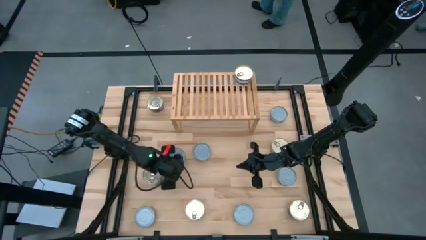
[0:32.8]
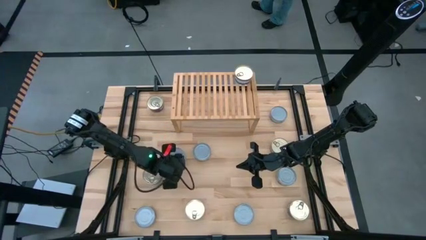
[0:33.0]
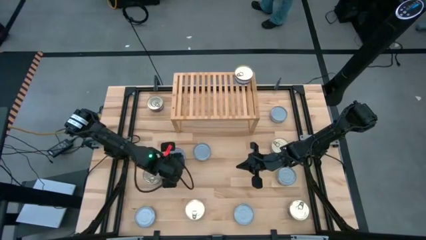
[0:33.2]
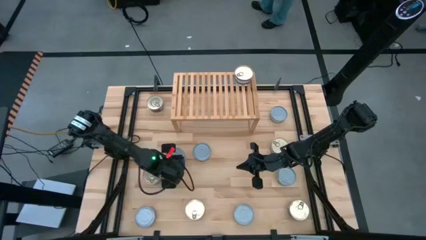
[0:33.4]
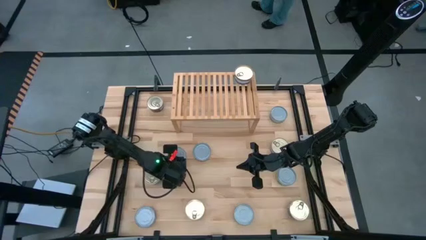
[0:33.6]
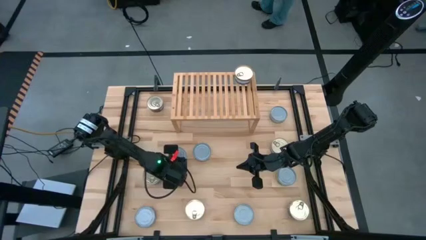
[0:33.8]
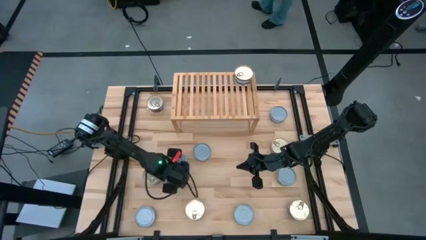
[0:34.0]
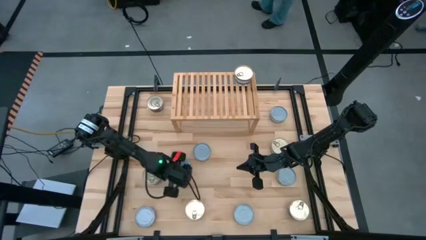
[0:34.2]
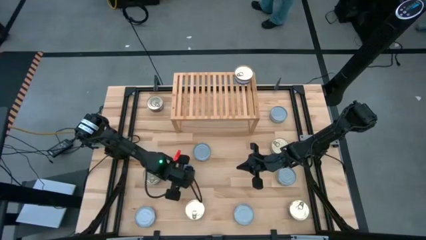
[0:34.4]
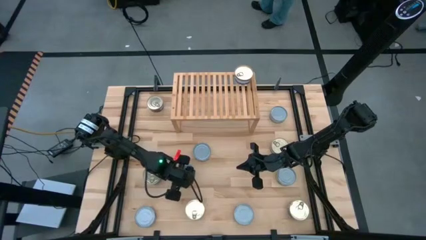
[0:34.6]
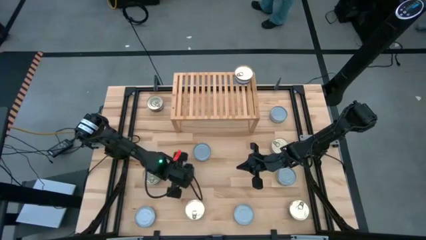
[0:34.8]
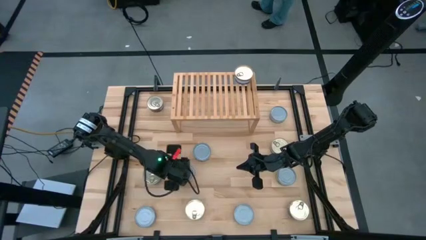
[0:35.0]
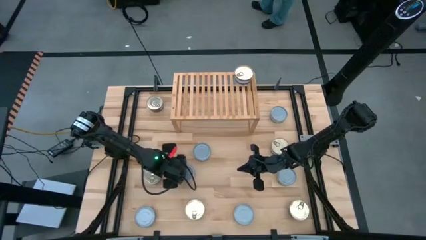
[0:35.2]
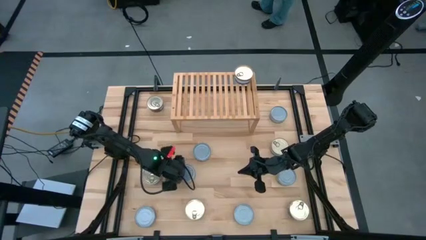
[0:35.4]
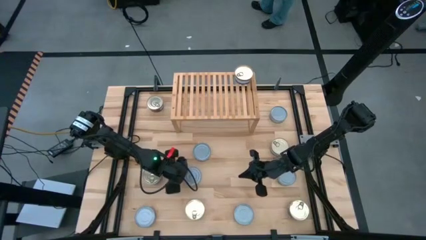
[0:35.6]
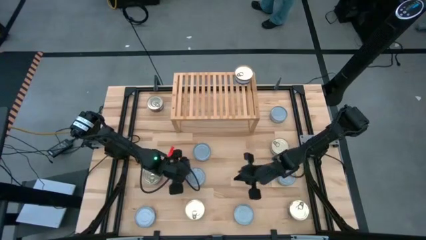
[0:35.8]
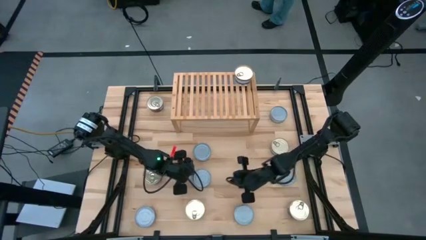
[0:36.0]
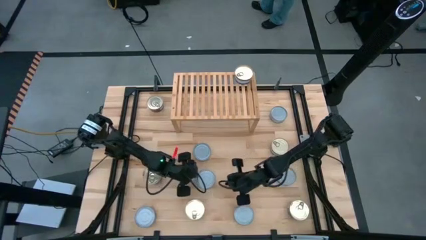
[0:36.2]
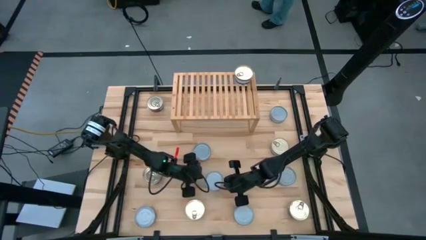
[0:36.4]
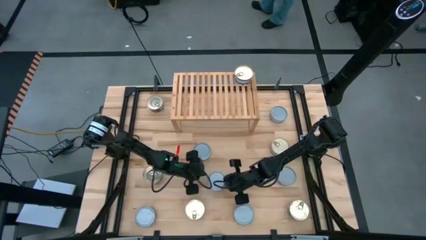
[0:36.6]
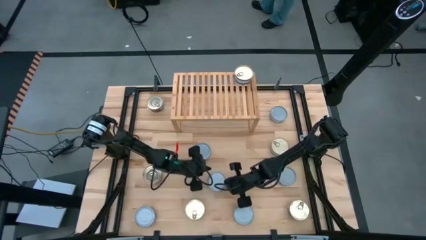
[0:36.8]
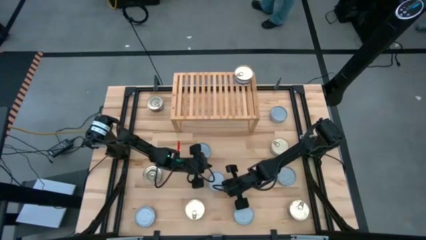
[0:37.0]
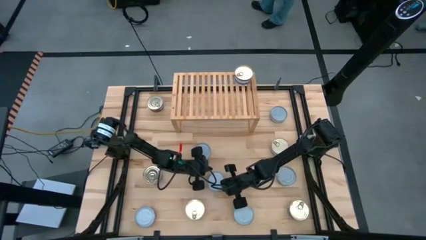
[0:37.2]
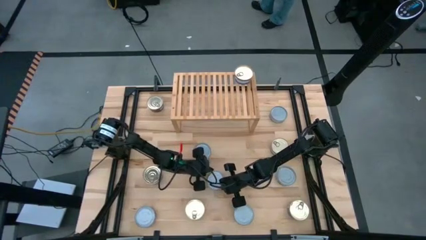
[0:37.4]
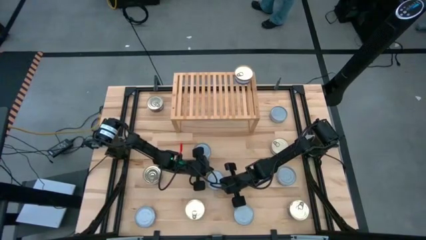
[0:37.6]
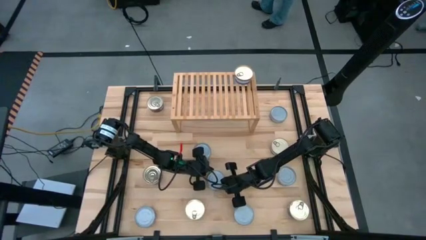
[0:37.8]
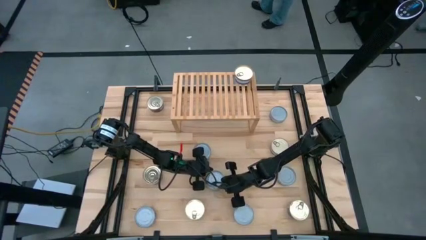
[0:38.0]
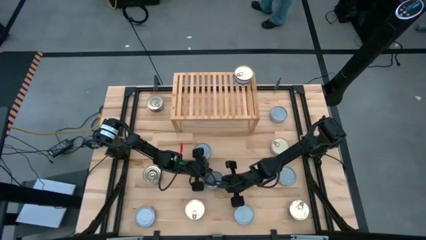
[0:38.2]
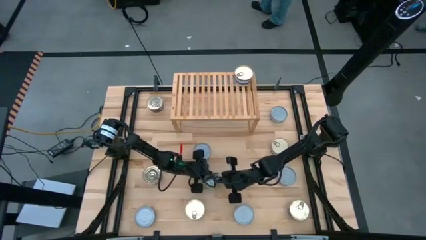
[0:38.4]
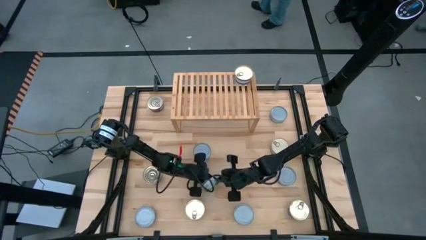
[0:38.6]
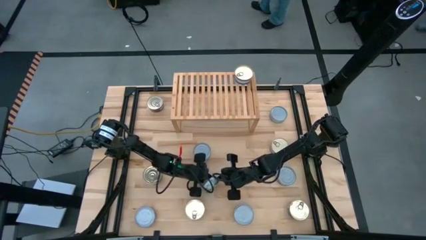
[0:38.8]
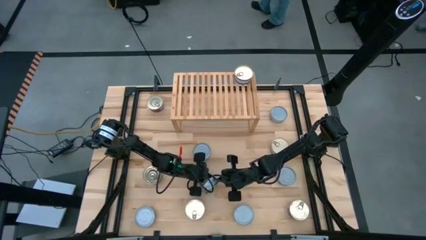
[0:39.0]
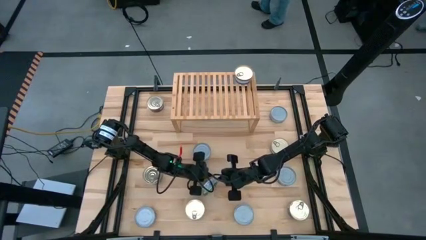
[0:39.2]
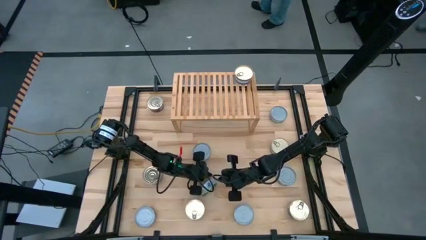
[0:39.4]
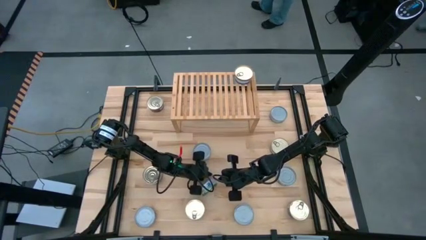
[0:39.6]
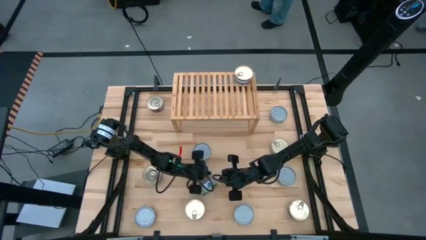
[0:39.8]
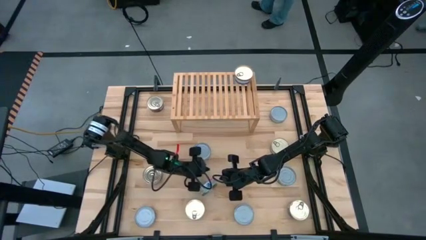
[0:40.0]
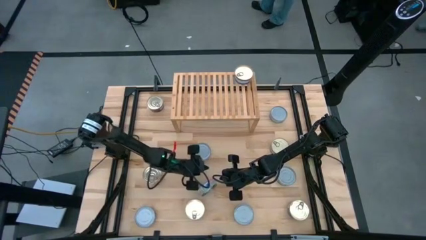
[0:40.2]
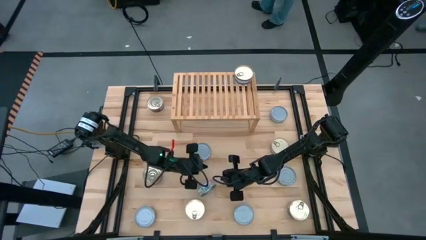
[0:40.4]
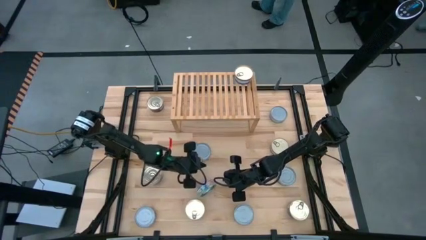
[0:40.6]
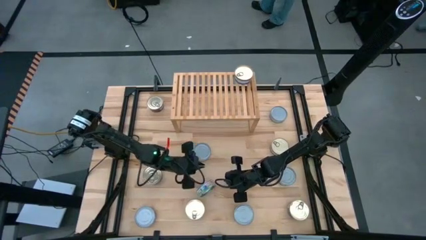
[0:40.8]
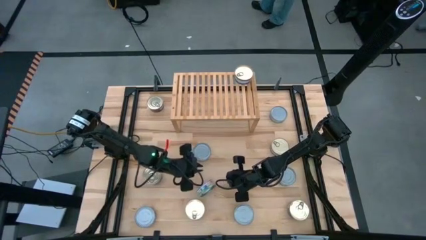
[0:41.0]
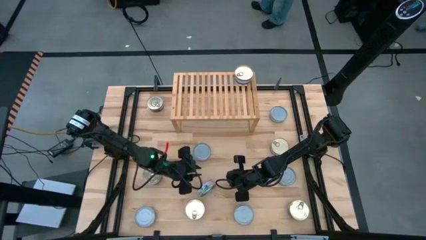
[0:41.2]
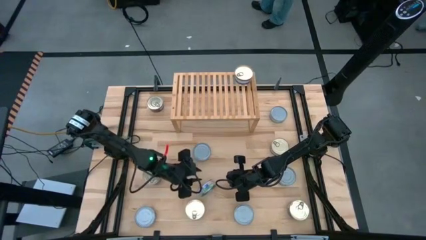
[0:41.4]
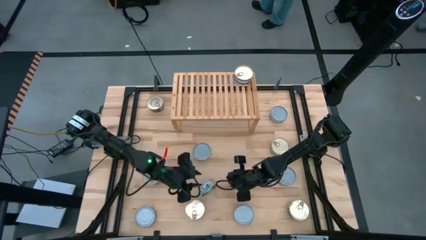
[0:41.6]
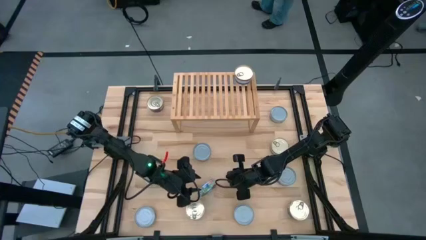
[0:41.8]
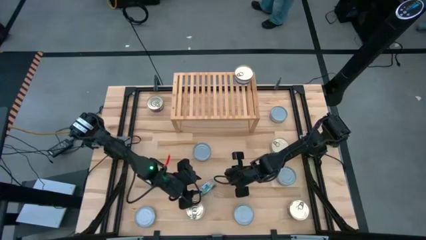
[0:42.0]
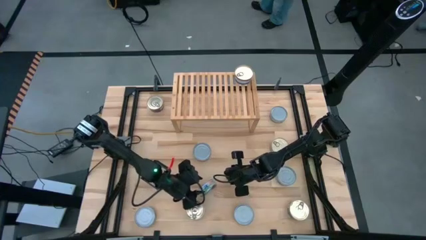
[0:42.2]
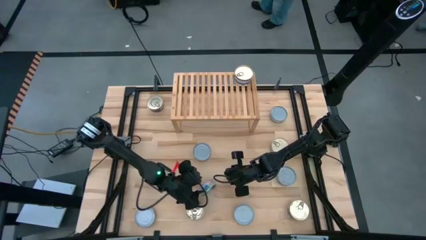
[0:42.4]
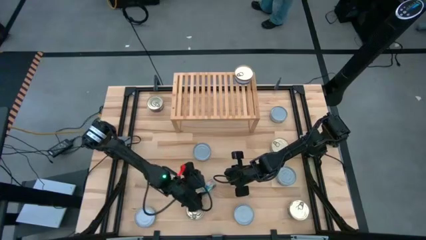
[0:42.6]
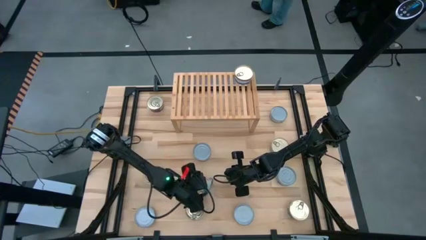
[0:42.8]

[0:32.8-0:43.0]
Task: Stack canned seafood by type on shelf
Put the green tuna can on the shelf

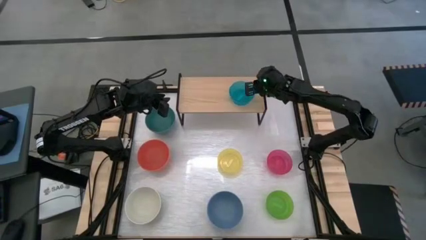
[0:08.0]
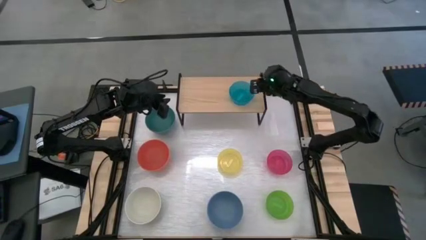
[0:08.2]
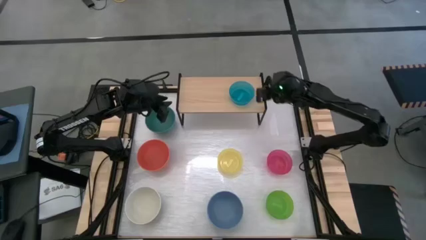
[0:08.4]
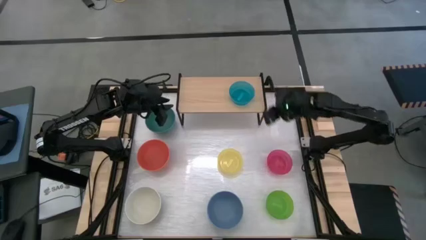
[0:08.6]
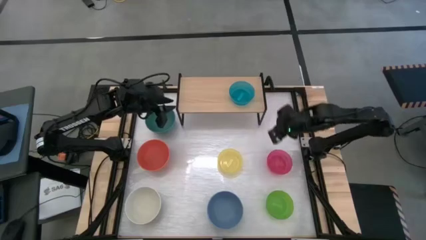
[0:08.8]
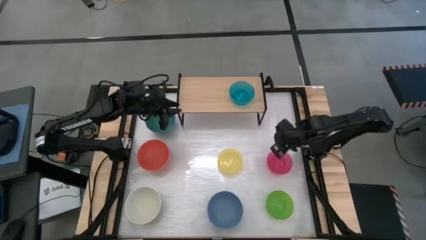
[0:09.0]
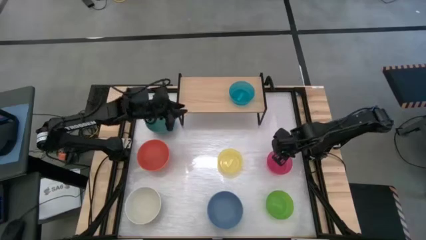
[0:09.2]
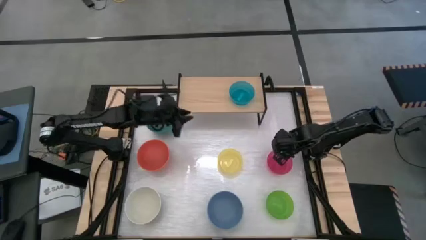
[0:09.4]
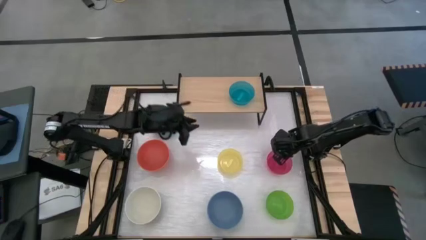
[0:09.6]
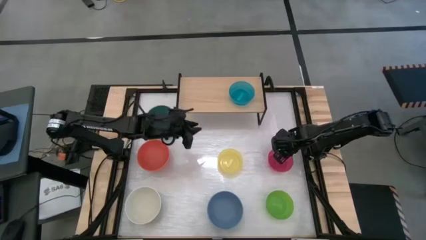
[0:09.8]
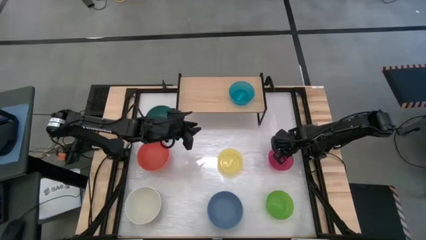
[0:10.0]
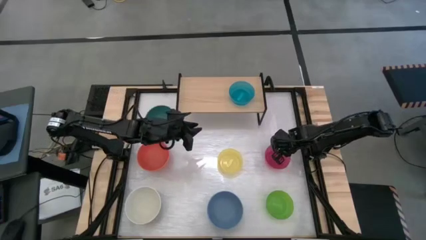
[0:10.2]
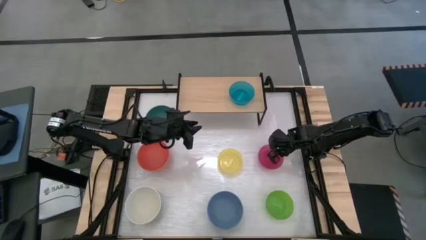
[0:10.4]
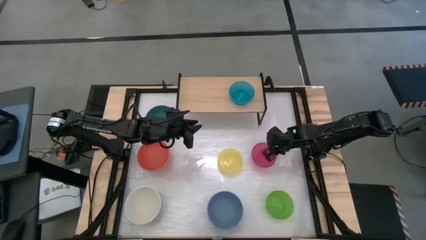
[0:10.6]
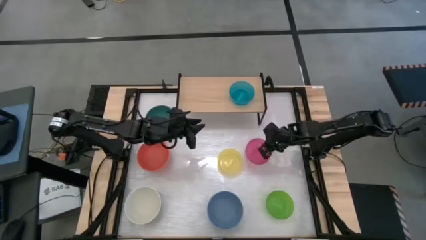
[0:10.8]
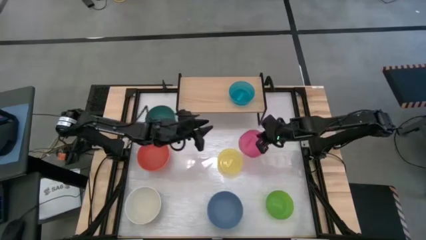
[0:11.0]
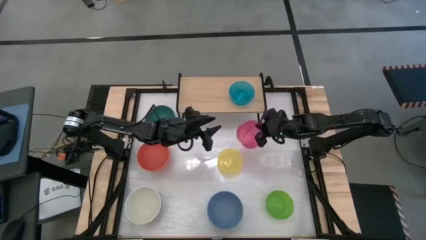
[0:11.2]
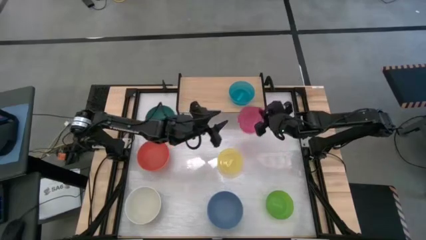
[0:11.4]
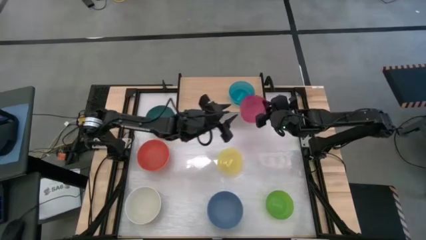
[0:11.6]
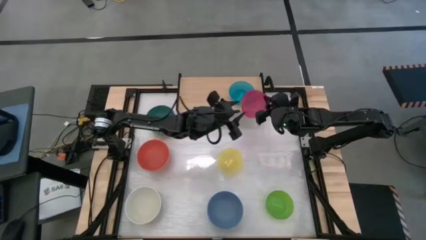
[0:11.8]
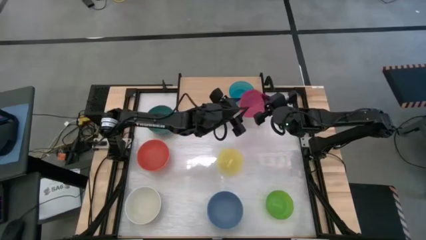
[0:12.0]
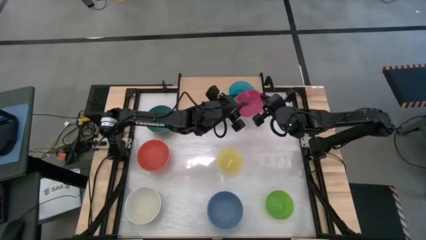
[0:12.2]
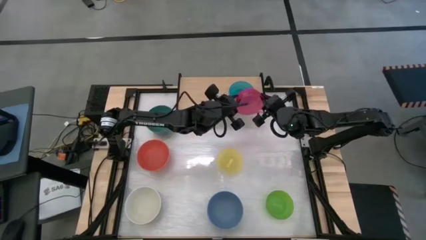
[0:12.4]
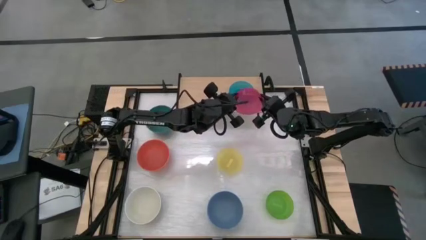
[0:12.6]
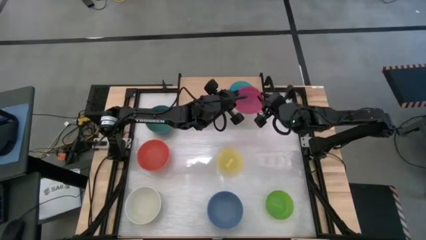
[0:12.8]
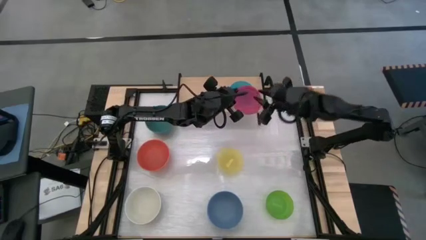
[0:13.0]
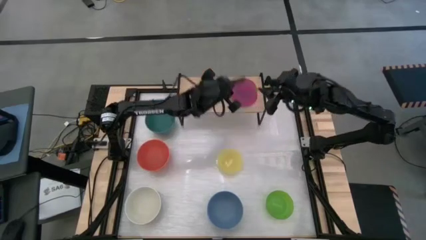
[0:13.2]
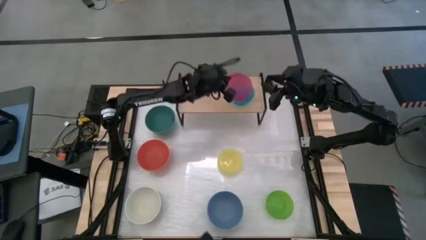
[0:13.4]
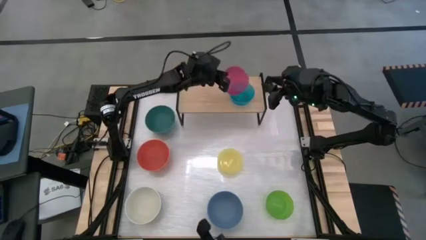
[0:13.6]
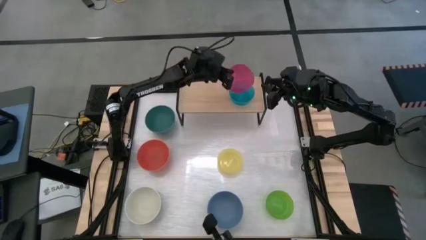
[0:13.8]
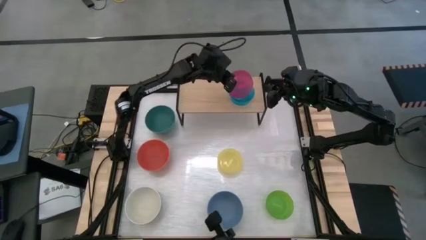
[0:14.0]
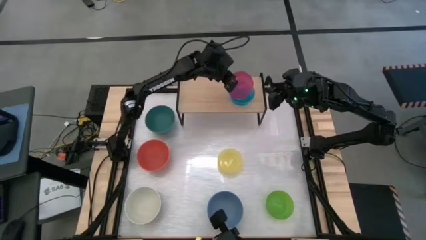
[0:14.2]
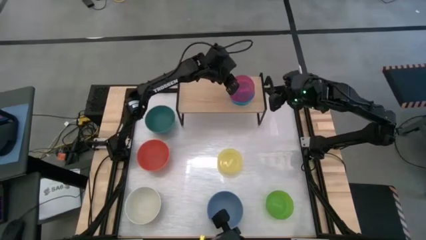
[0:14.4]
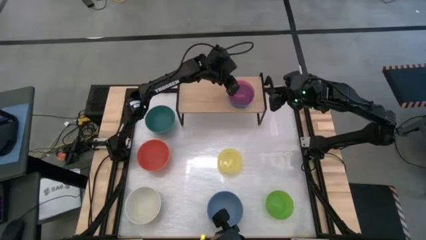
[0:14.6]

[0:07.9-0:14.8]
Task: Place and stack bowls onto a shelf
Stack the pink bowl on top of the light blue bowl on the shelf
